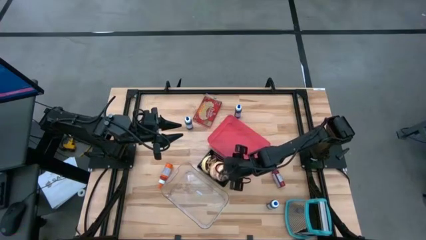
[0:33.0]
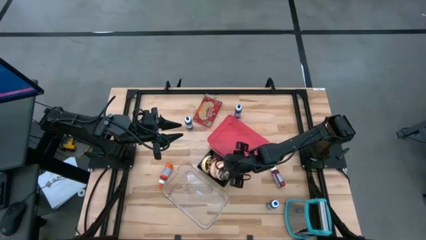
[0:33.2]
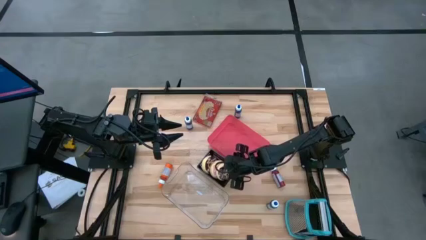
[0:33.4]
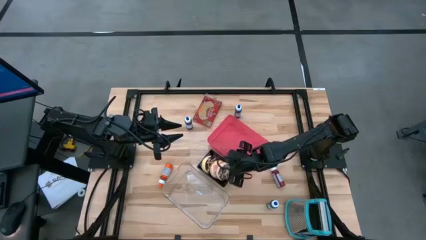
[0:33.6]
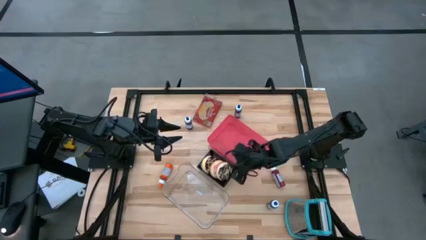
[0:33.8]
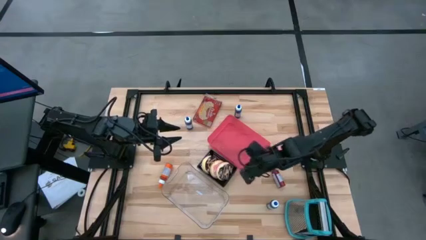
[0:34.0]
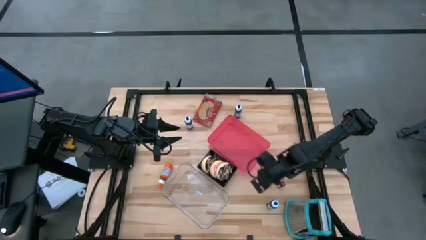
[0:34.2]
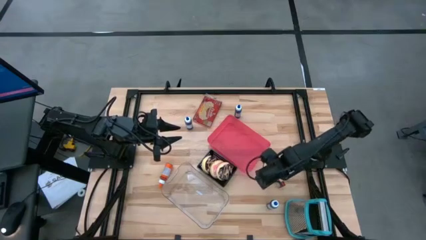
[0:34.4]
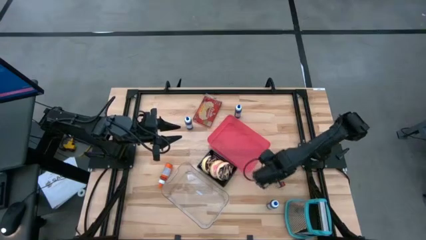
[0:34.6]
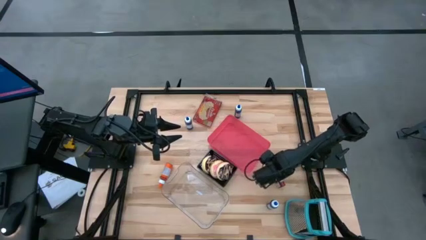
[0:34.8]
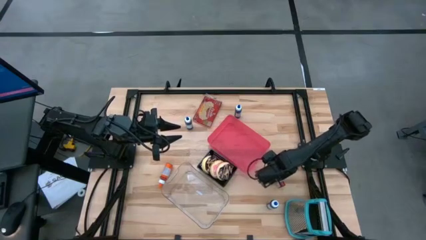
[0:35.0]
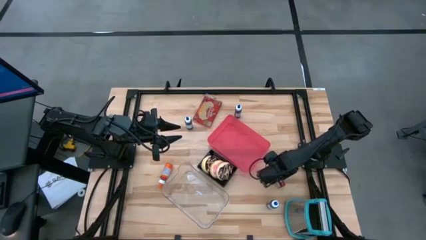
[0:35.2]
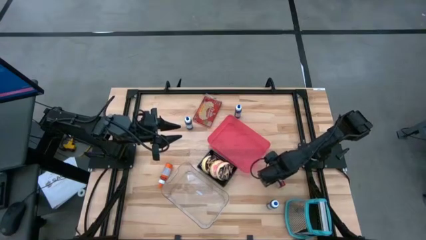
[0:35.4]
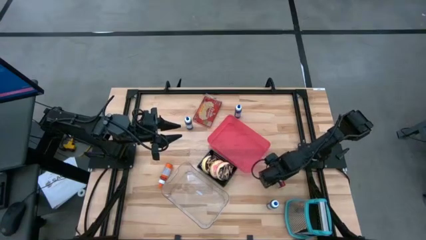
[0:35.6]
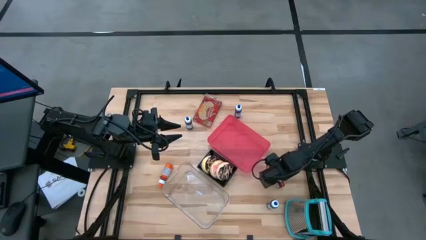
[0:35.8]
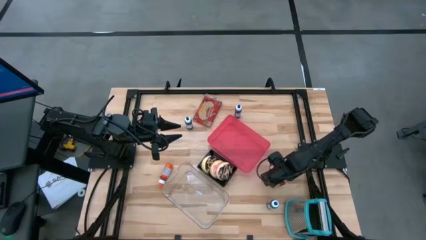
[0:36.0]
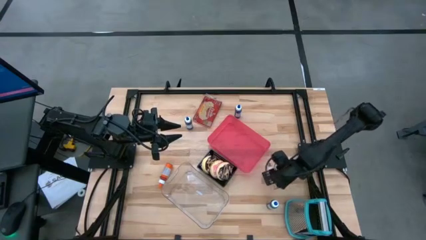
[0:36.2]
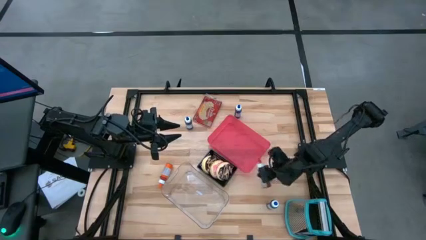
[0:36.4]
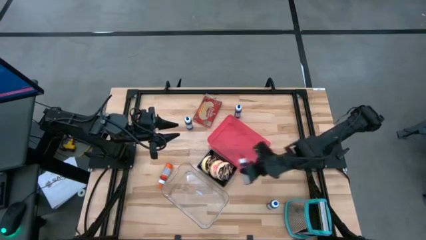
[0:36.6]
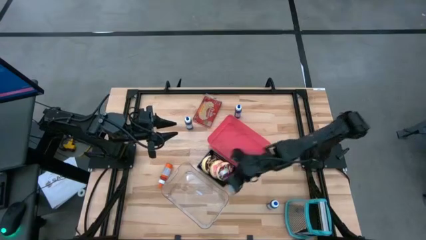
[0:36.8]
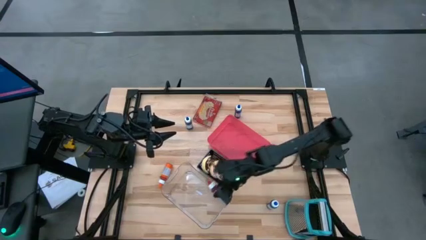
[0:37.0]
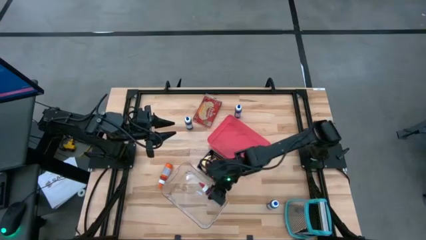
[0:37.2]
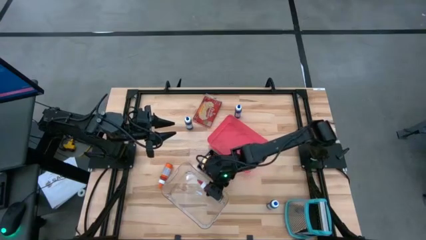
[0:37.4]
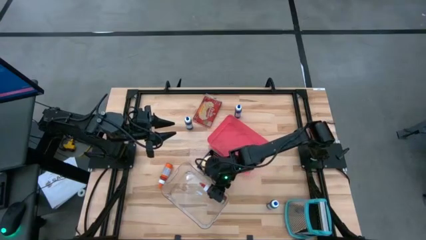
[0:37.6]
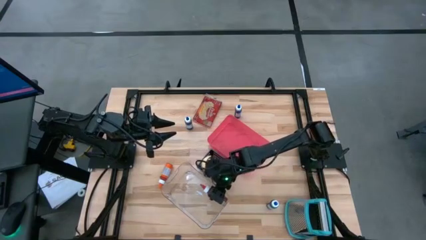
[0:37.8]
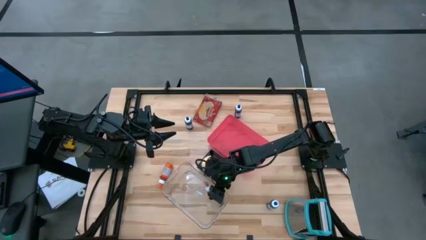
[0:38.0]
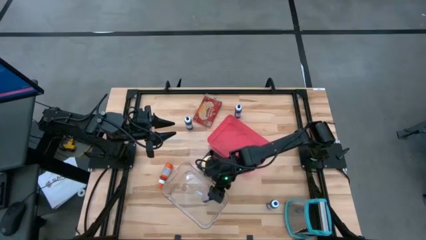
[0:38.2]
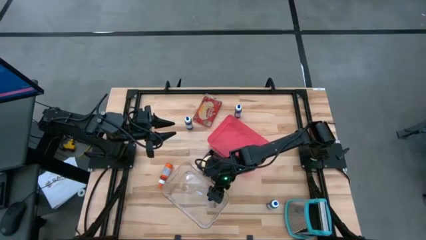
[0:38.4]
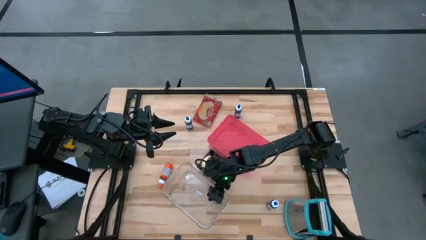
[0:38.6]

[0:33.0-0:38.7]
Put the red food coloring bottle into the transparent bin

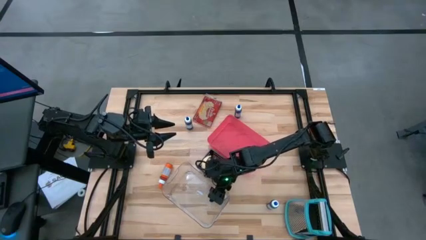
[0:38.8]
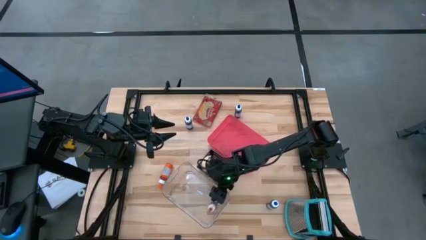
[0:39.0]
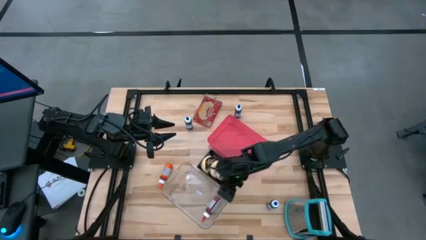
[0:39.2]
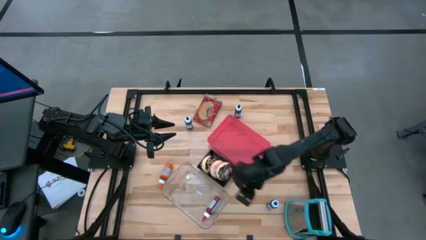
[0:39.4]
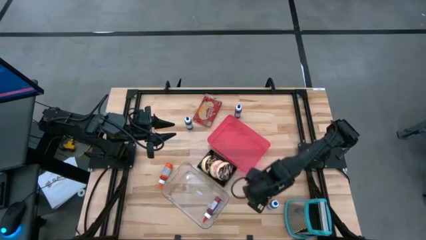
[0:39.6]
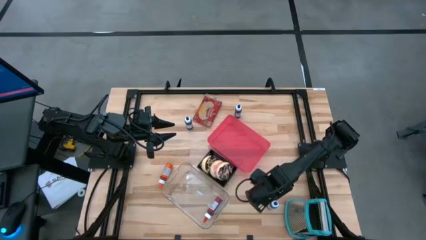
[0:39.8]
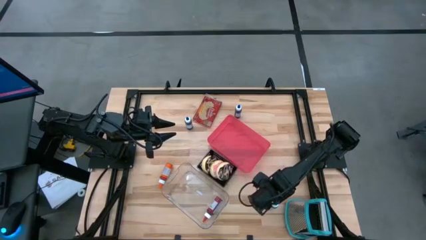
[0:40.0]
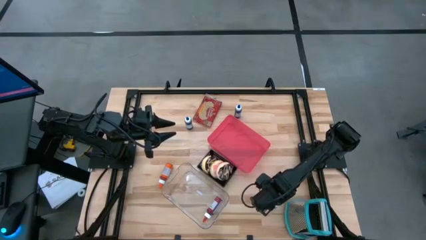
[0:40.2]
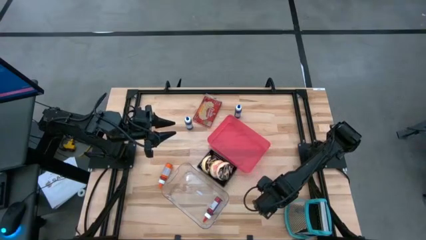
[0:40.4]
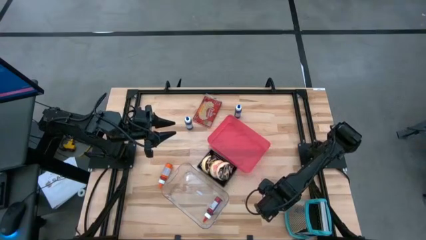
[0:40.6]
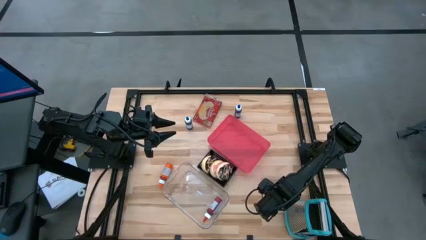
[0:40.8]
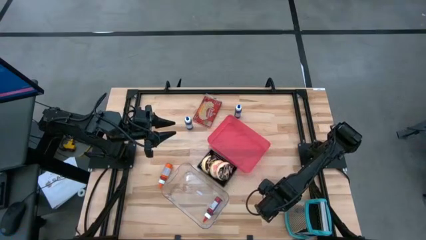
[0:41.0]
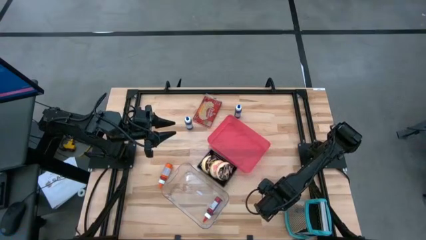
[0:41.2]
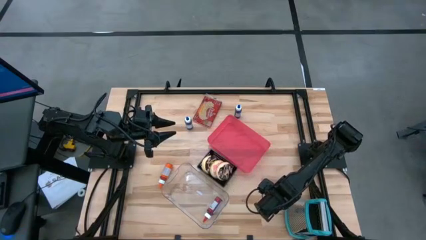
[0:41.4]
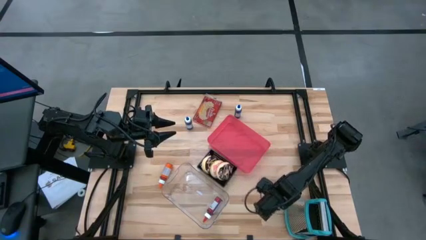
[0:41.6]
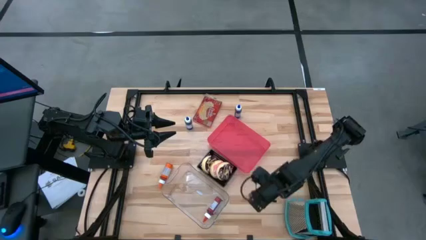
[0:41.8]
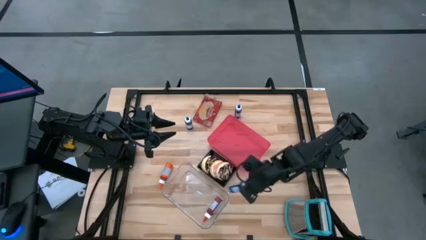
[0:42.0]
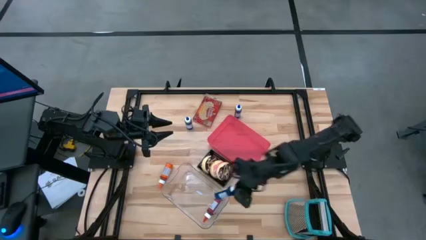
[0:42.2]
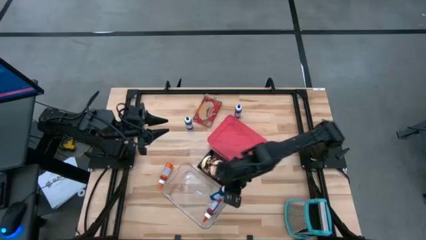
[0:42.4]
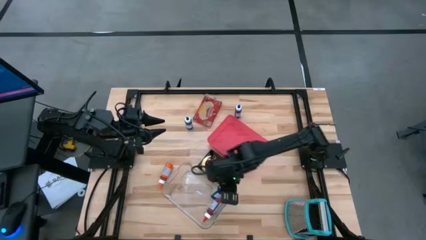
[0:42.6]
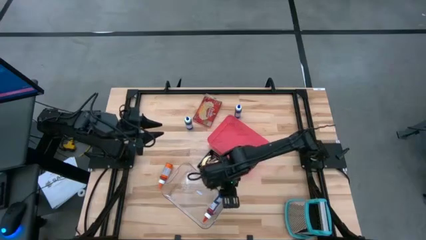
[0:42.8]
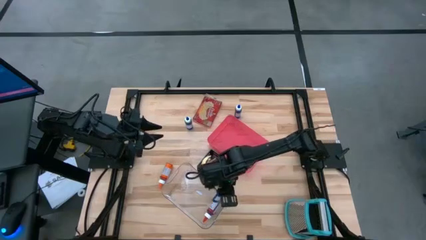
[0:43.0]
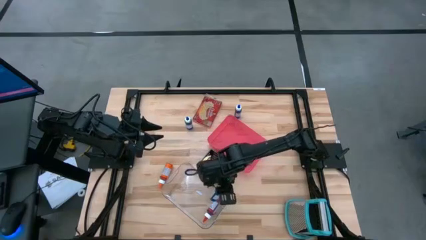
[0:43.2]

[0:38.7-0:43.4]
Put the bottom blue food coloring bottle into the transparent bin

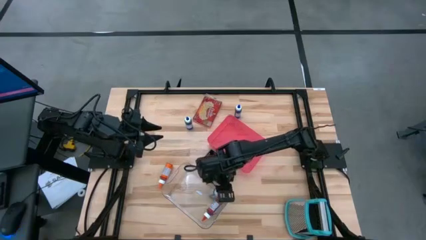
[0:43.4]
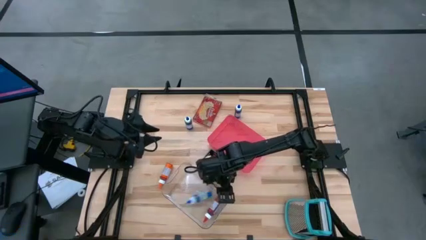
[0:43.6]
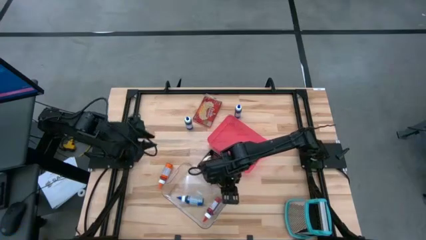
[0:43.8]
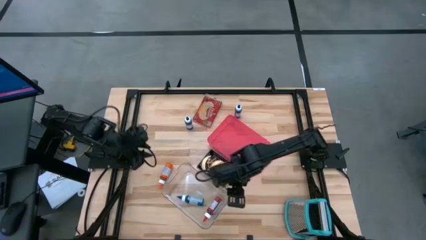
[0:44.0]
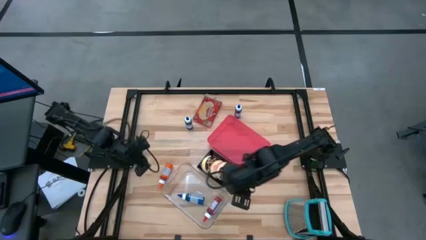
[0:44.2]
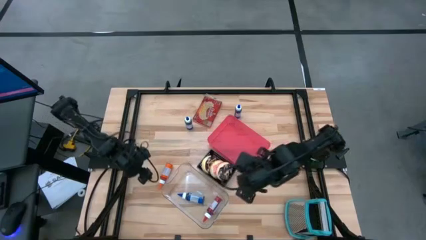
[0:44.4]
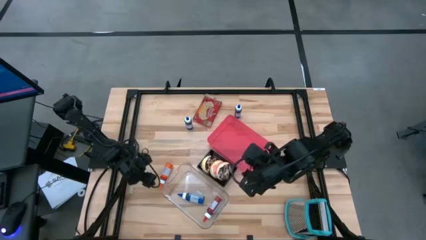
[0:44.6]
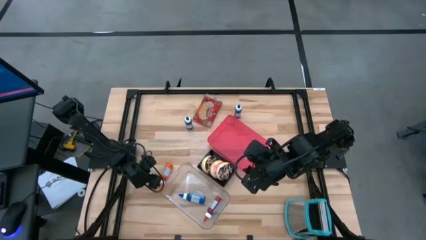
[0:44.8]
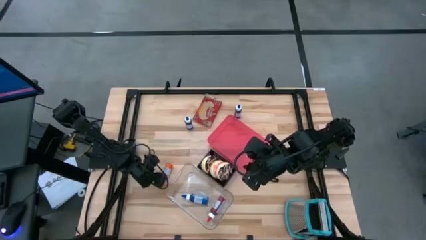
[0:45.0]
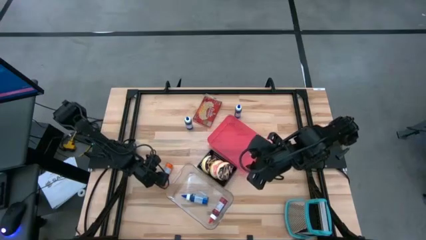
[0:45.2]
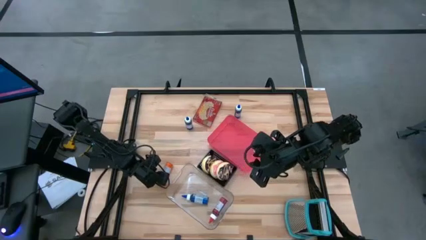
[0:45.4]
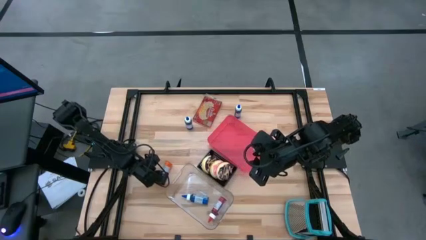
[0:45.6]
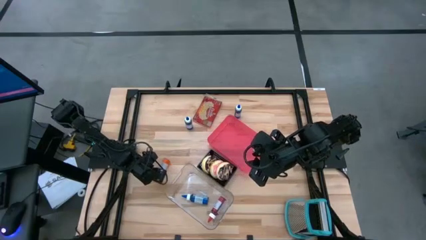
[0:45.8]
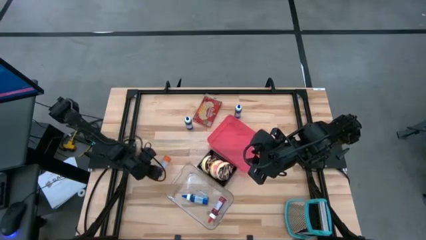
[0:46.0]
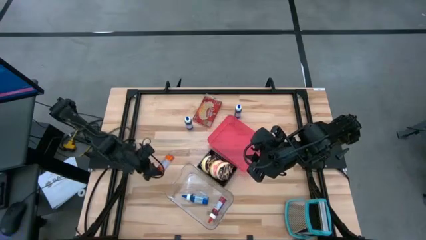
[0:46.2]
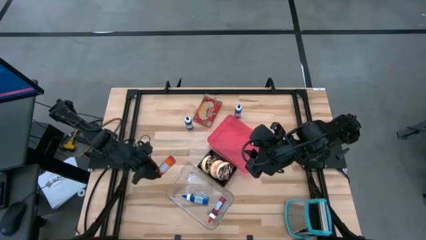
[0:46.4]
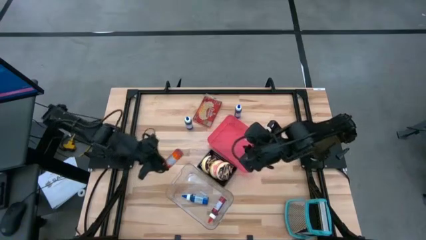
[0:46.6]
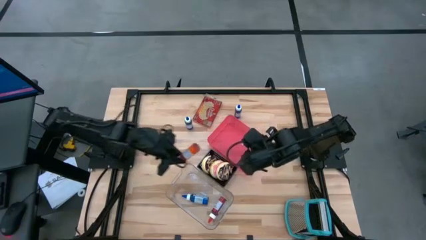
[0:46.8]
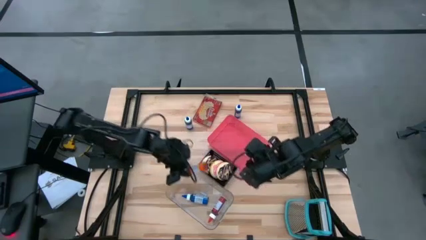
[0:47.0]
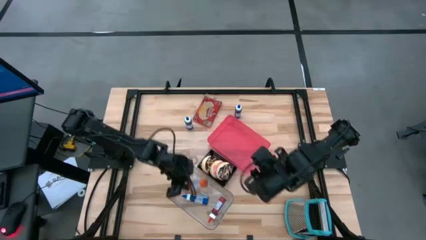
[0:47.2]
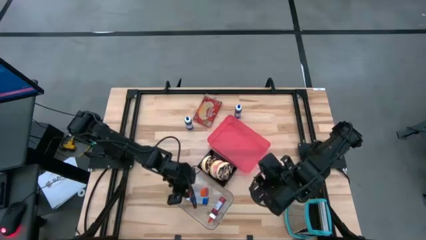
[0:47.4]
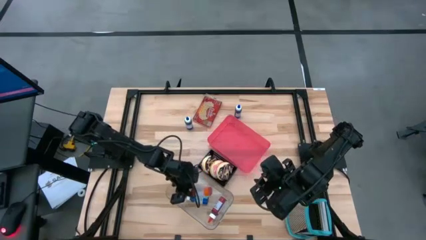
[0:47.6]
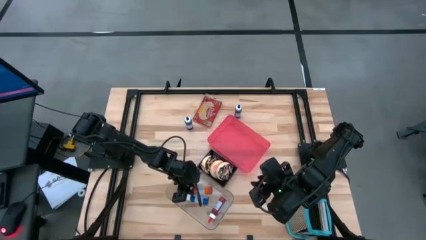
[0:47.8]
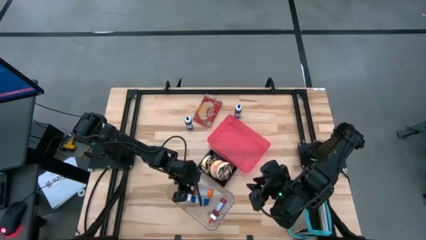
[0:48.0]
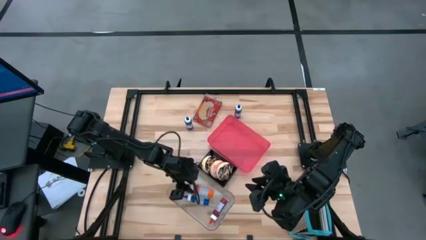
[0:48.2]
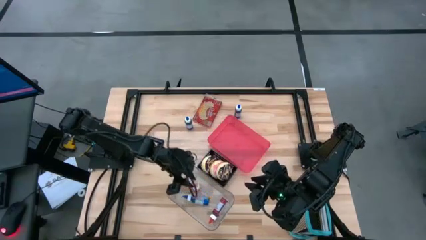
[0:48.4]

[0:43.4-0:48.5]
Put the orange food coloring bottle into the transparent bin
